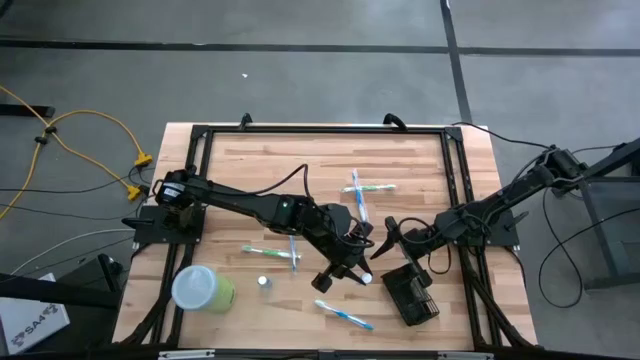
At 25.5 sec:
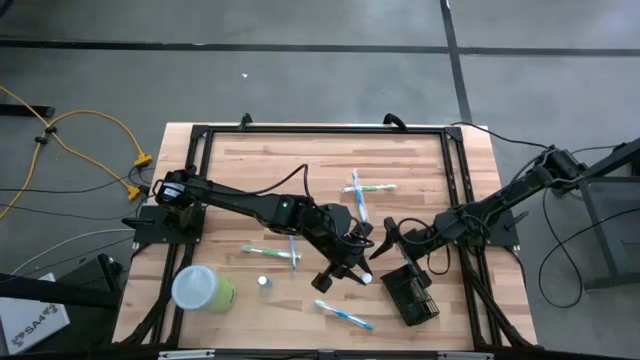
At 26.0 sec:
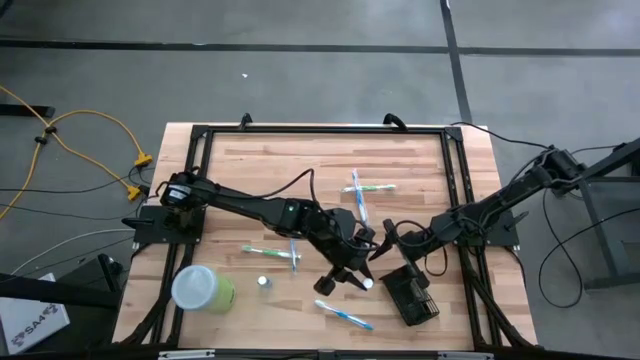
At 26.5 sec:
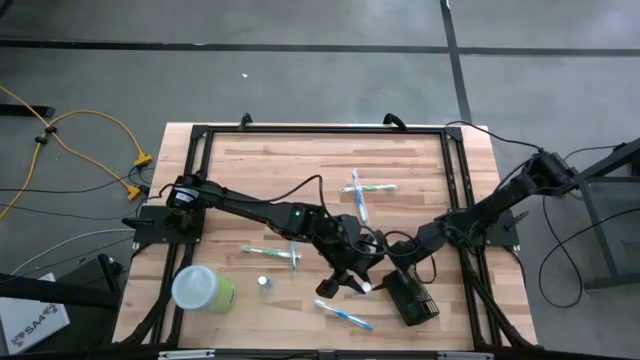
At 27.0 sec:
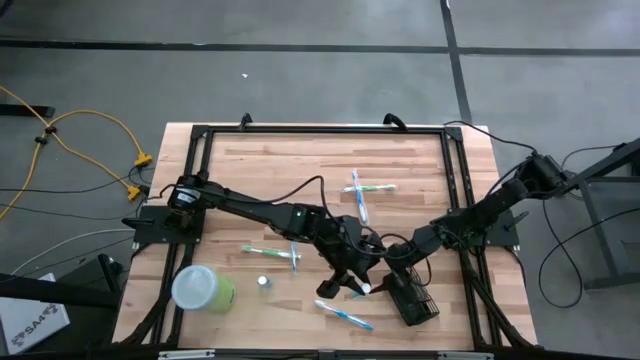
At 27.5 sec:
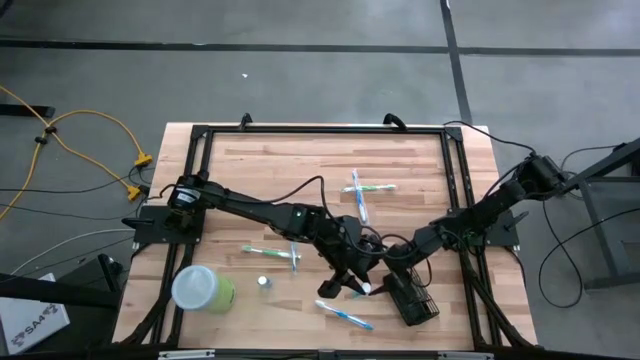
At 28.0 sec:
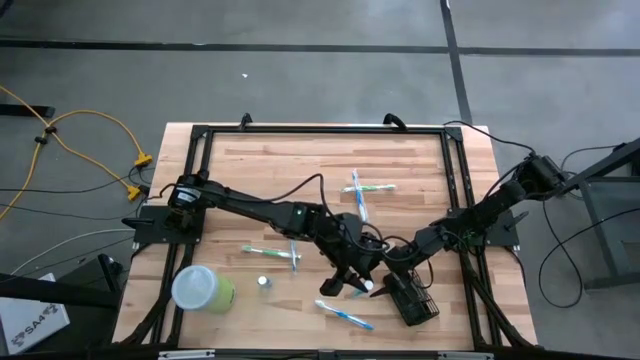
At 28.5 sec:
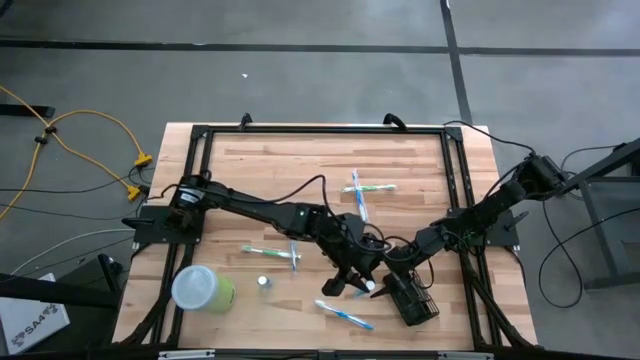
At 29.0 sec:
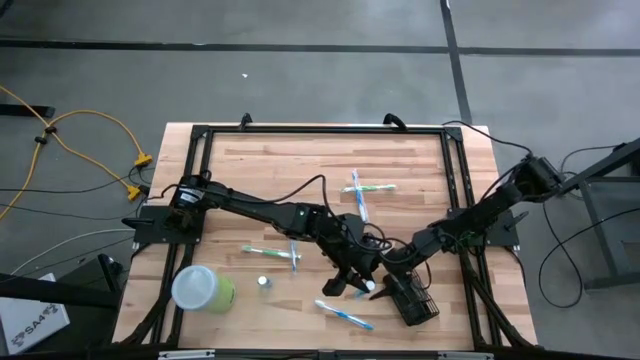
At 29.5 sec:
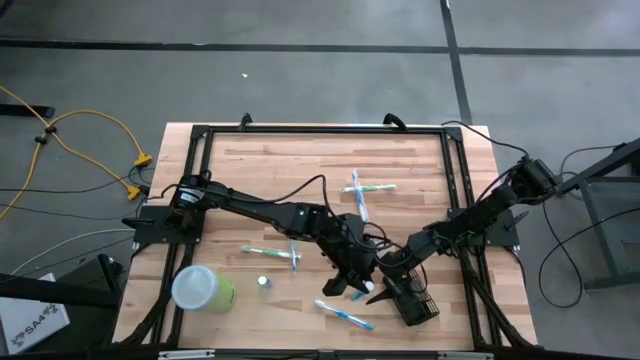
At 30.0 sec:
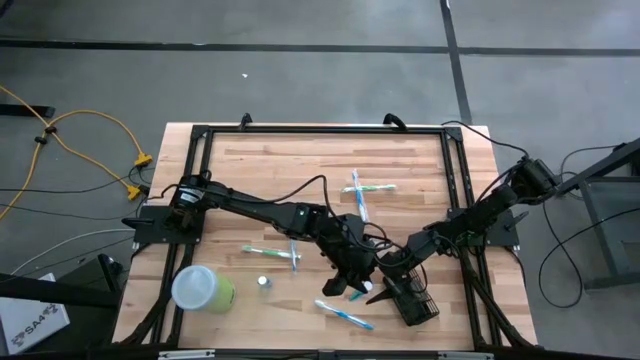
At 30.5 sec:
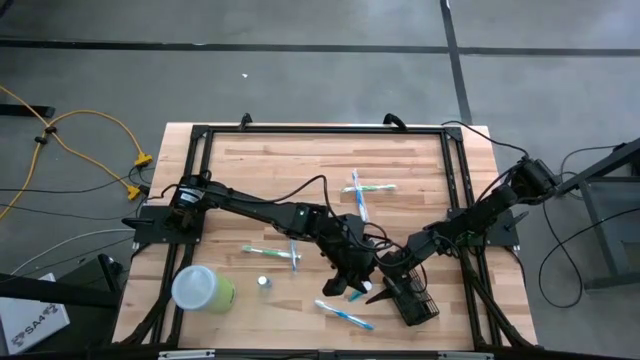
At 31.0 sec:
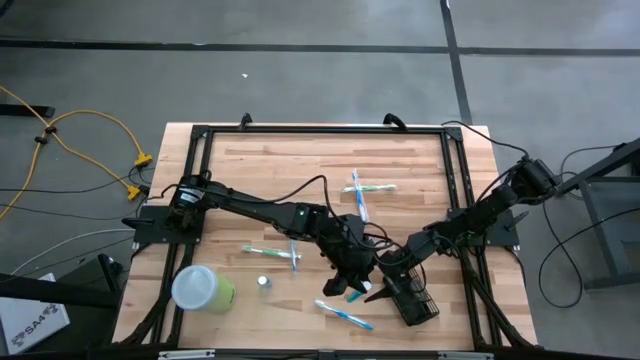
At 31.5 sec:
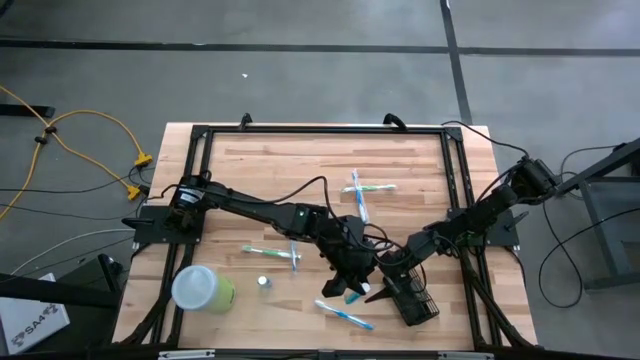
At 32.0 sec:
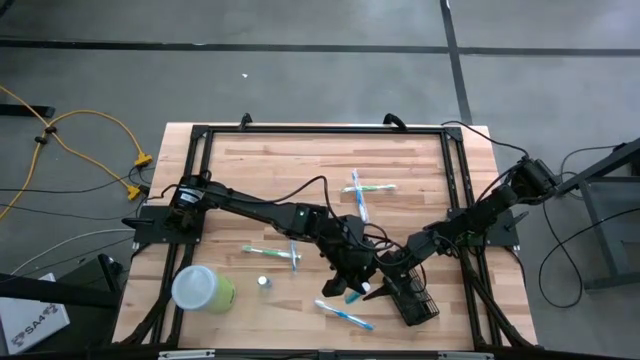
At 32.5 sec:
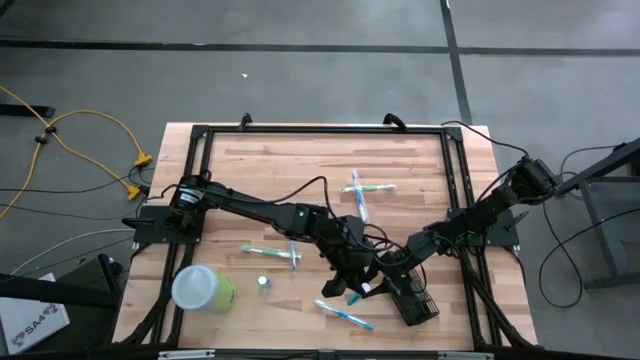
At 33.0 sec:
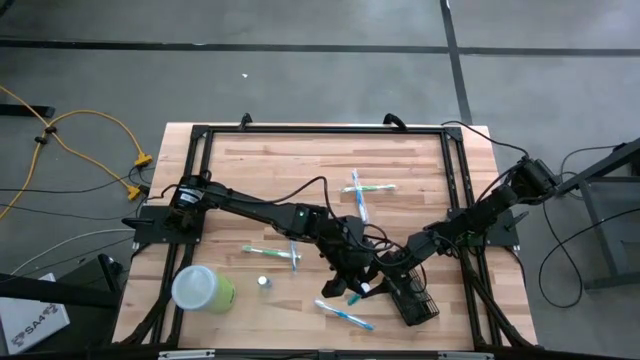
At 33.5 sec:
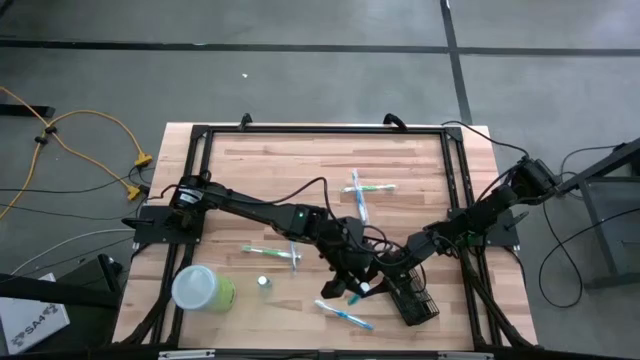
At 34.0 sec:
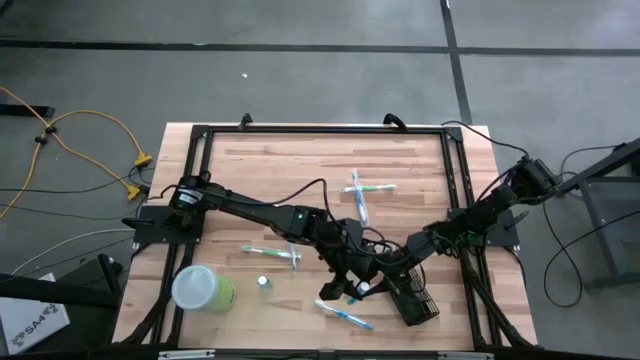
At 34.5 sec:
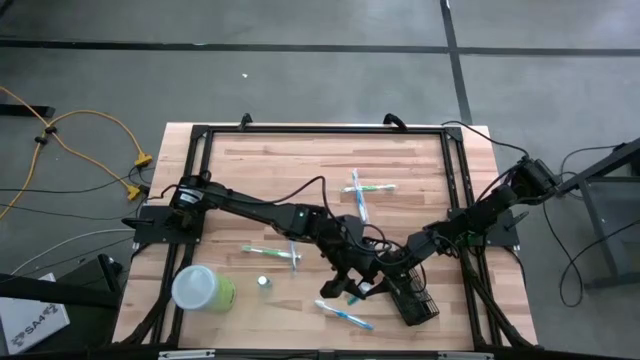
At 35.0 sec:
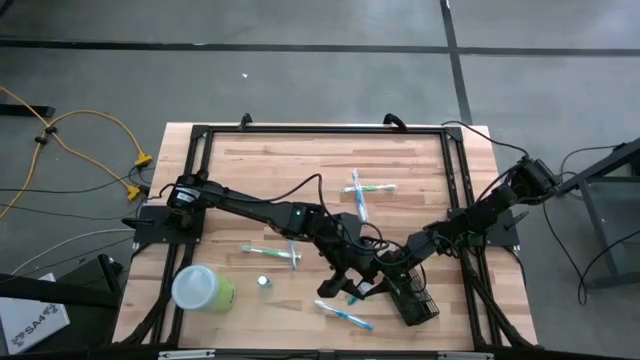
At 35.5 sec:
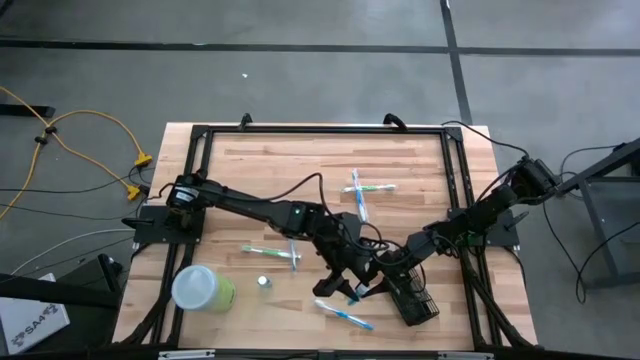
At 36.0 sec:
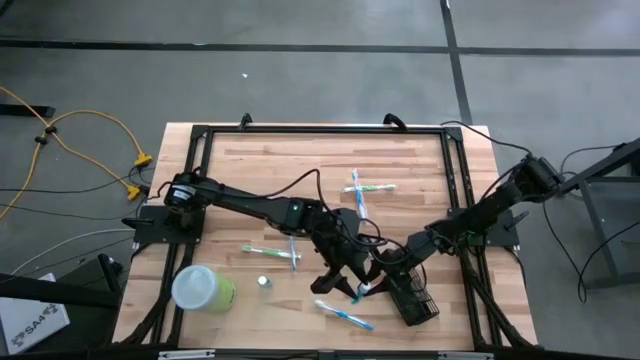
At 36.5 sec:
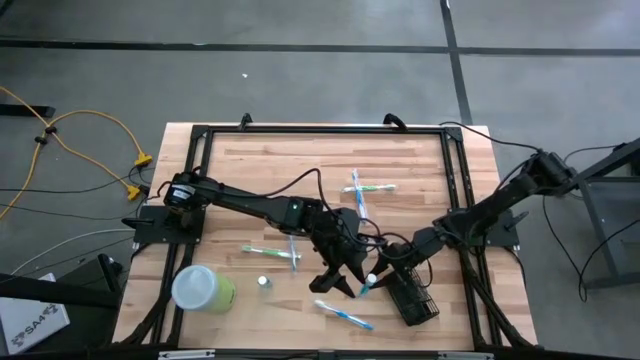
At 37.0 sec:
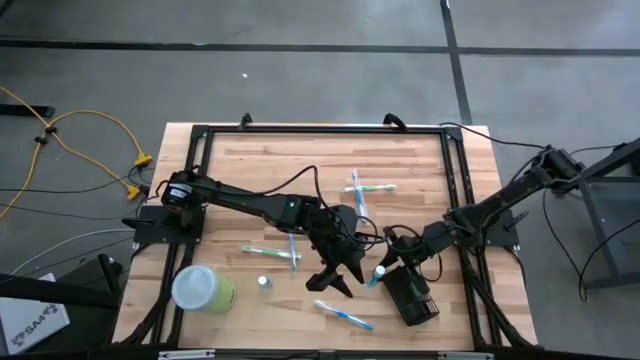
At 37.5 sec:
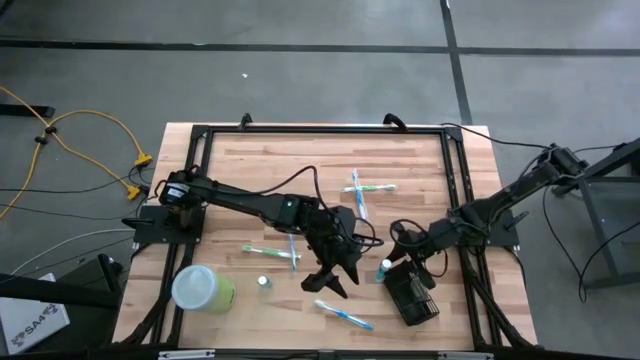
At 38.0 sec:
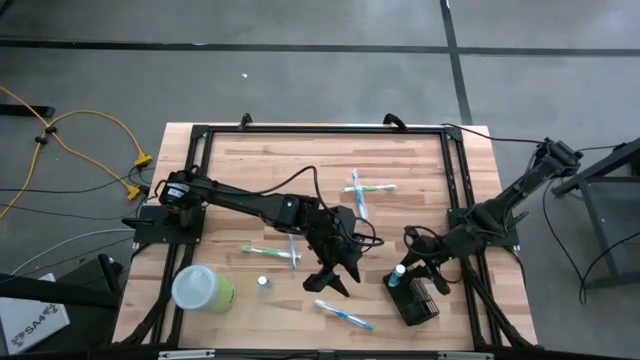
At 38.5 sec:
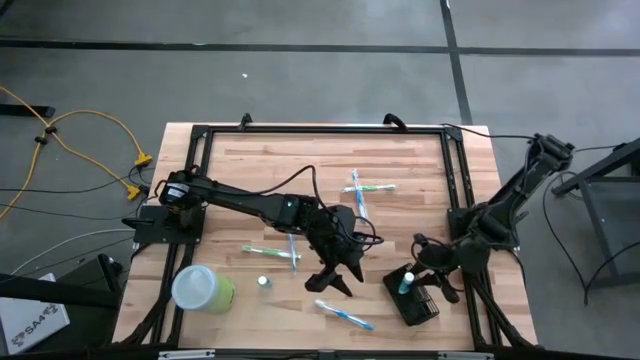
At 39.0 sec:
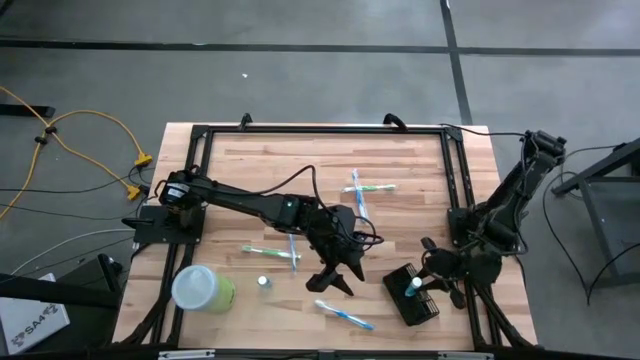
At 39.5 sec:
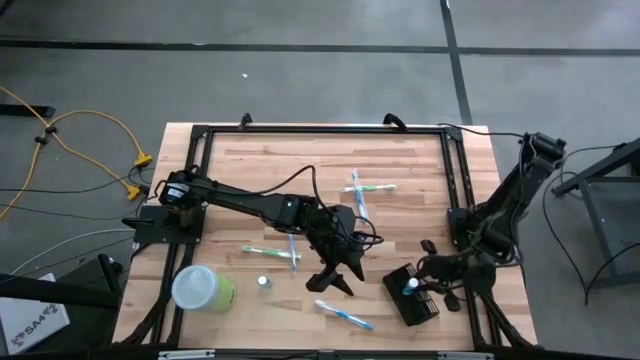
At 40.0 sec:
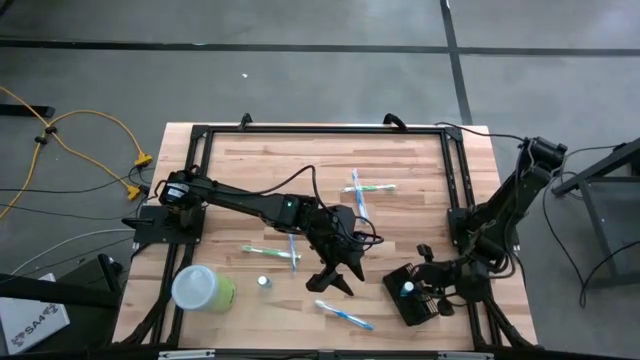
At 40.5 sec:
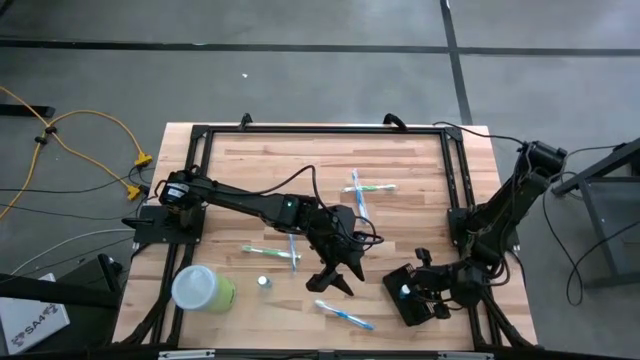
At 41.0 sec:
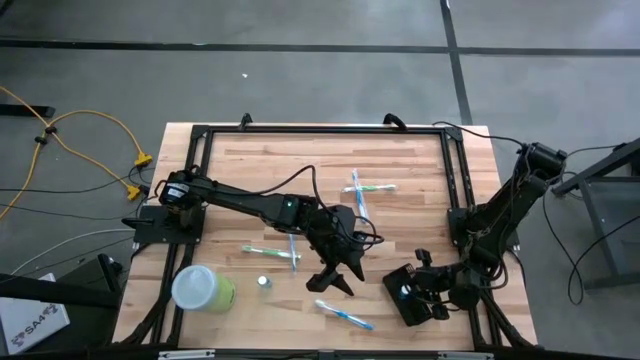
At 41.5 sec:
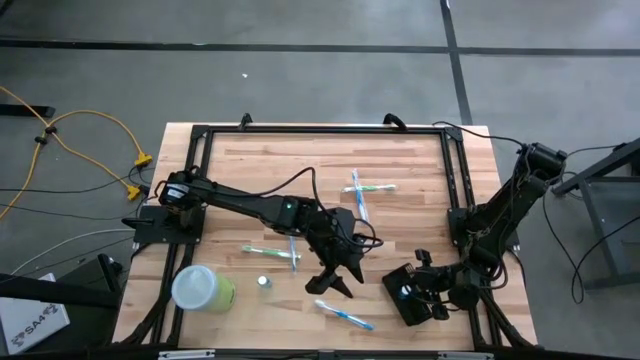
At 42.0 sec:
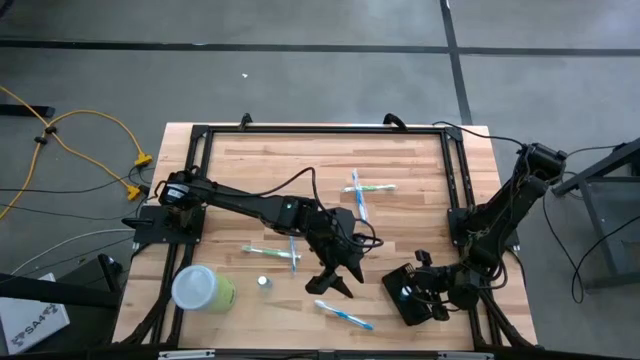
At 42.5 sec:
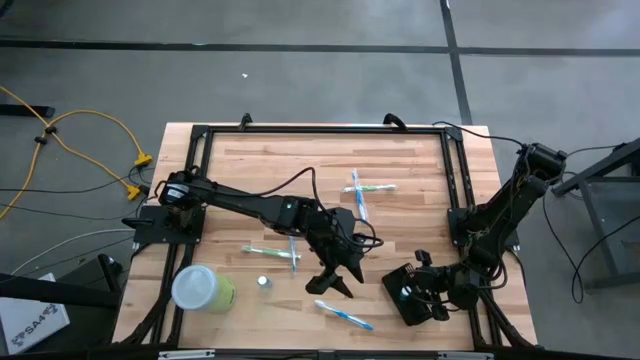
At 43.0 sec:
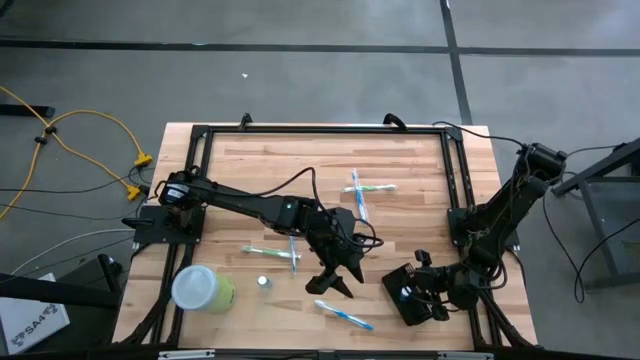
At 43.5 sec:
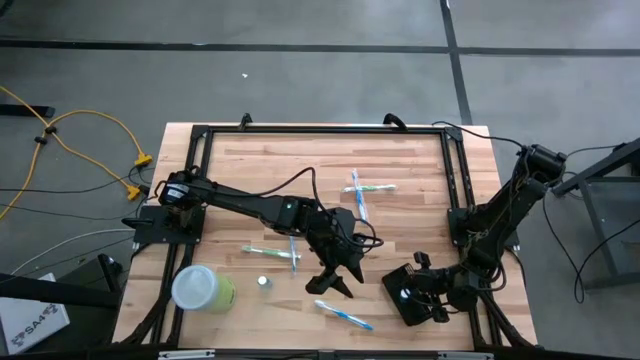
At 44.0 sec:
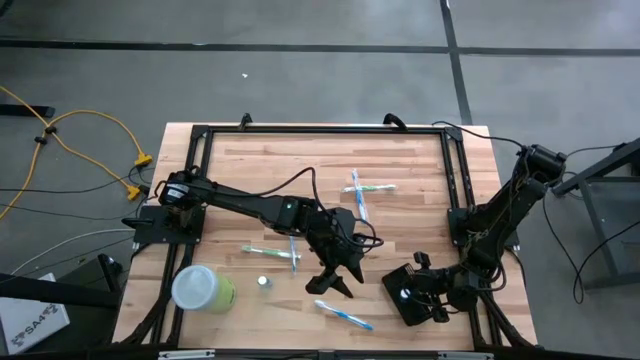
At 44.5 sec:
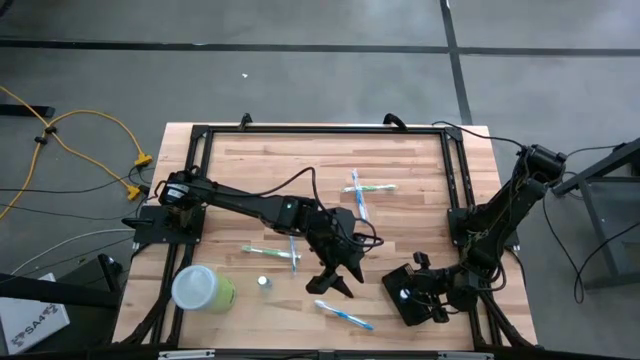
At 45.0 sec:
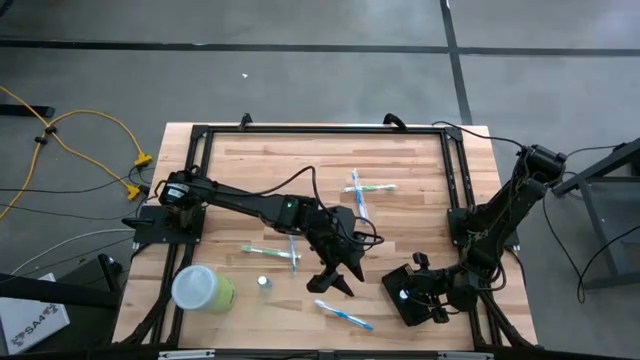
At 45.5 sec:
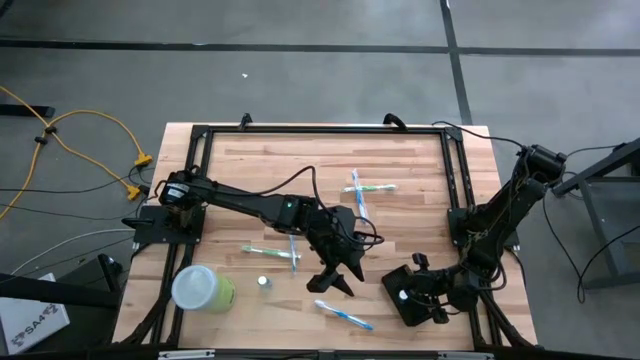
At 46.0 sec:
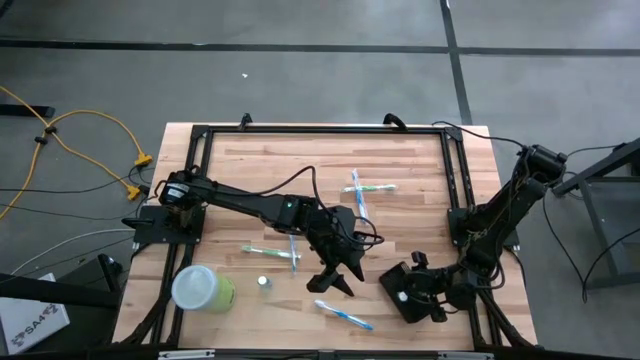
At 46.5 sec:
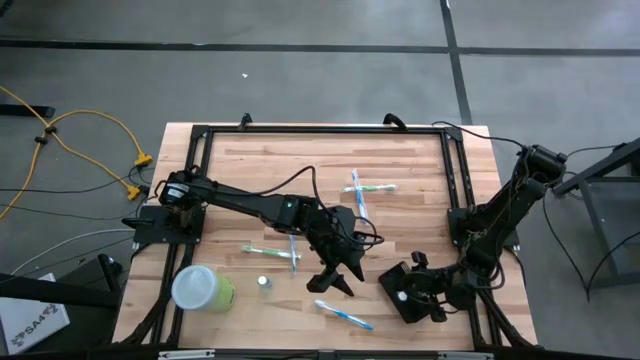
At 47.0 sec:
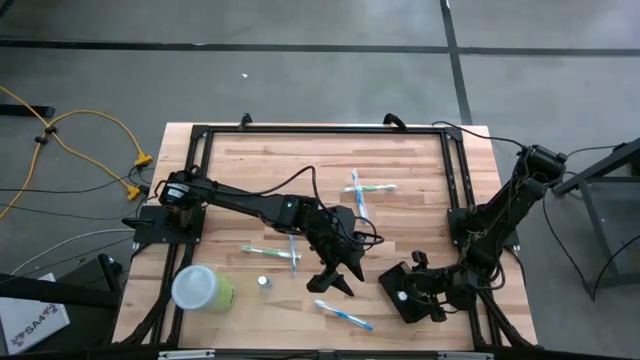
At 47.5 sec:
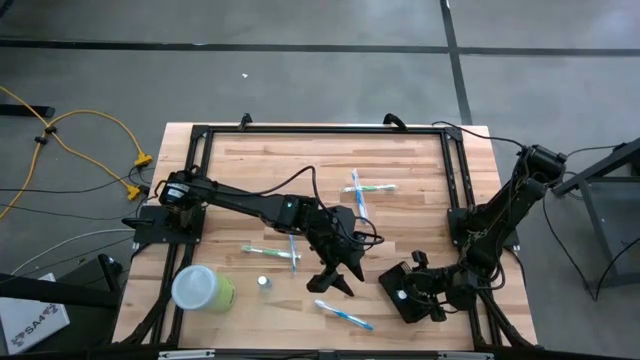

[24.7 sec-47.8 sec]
Task: Pick & Place toothbrushing station
Put the top blue mouthwash into the middle section of the of the black wire organizer
